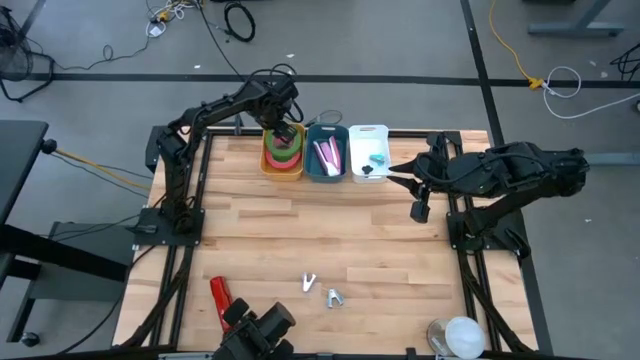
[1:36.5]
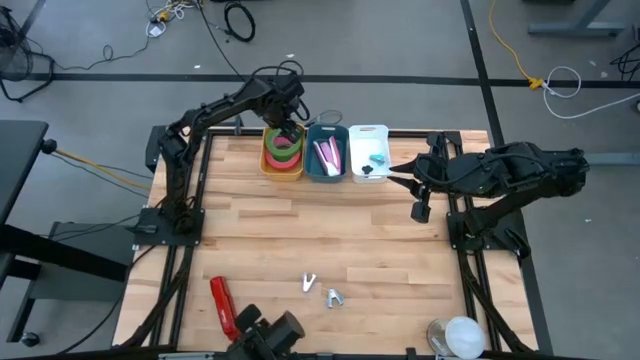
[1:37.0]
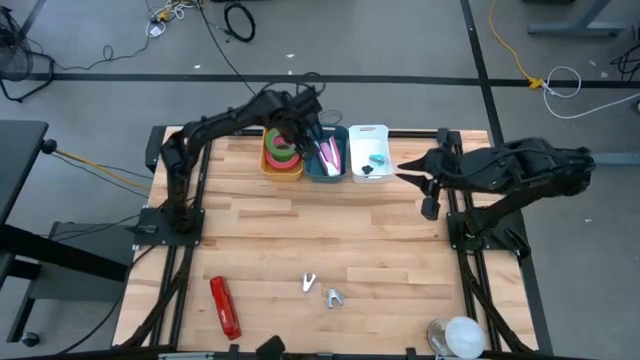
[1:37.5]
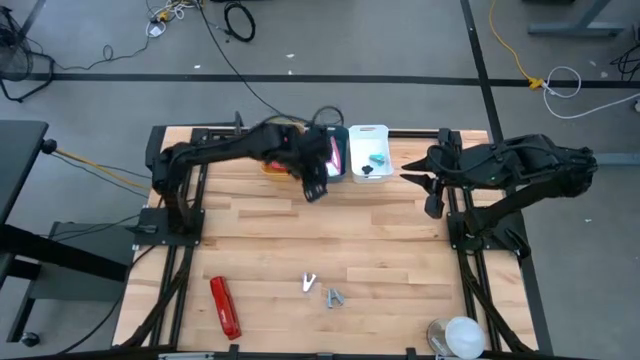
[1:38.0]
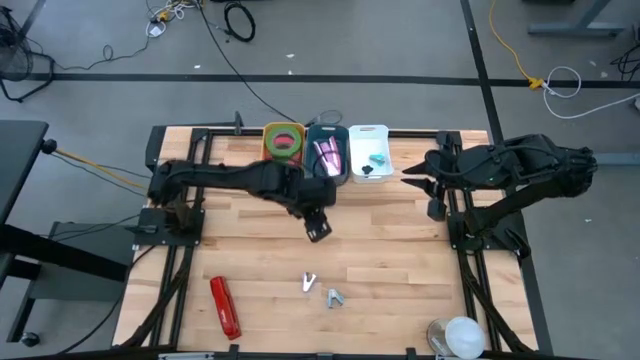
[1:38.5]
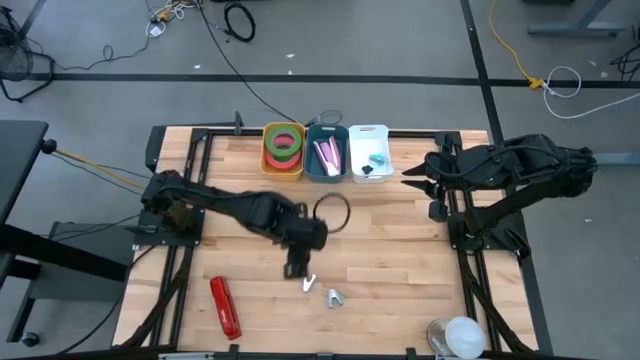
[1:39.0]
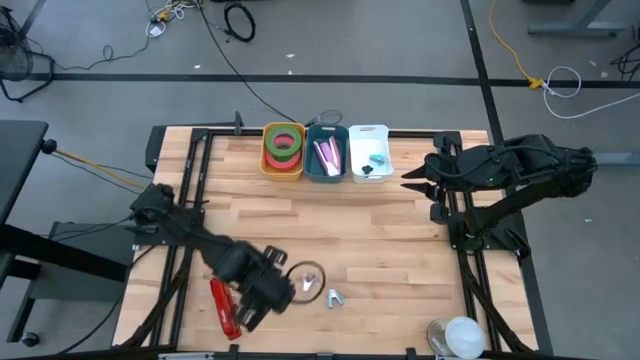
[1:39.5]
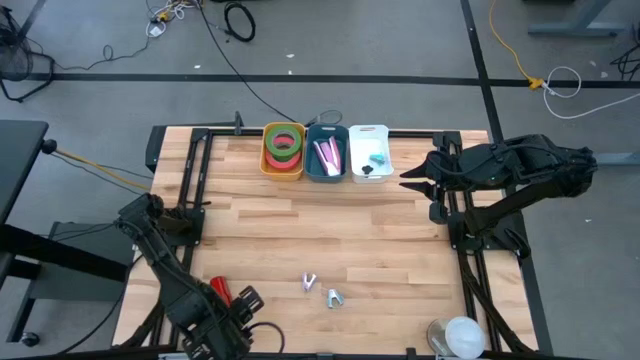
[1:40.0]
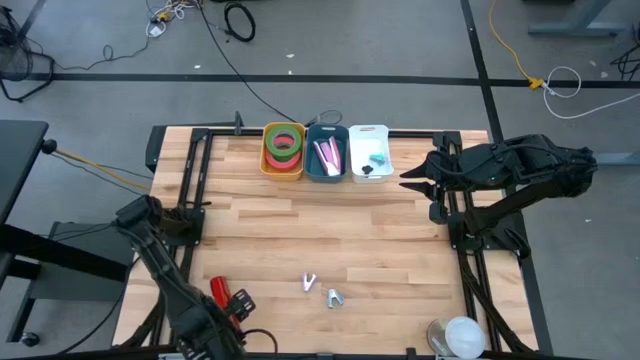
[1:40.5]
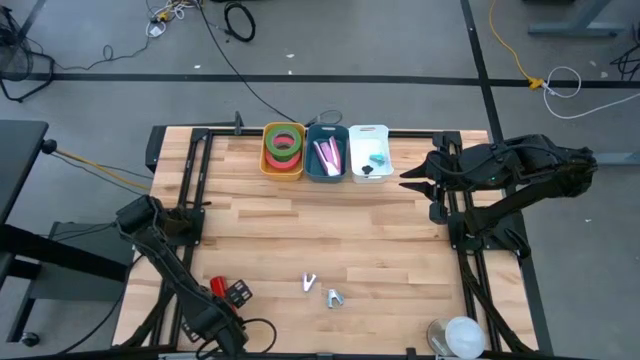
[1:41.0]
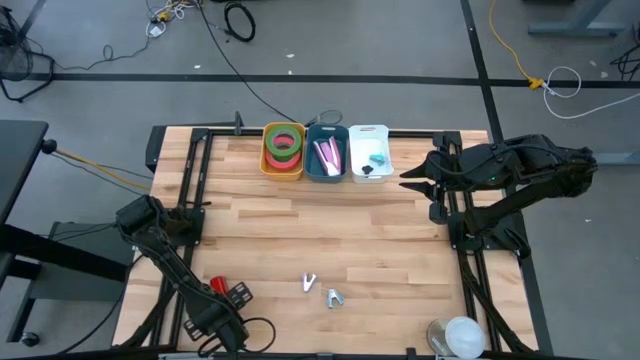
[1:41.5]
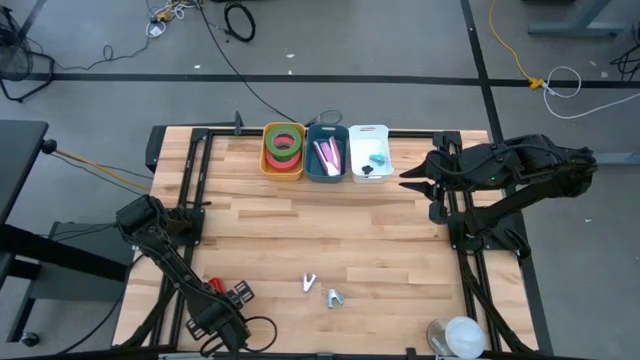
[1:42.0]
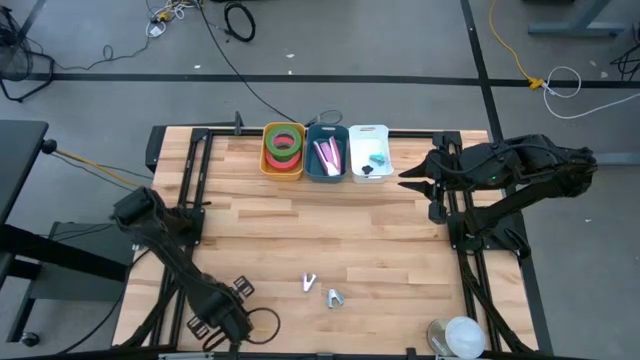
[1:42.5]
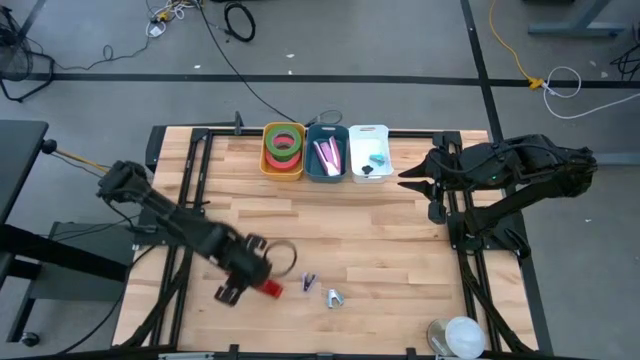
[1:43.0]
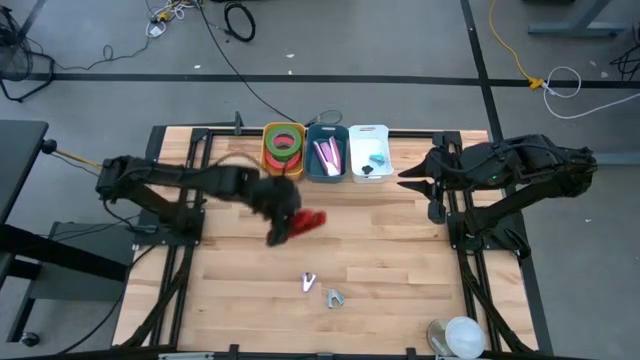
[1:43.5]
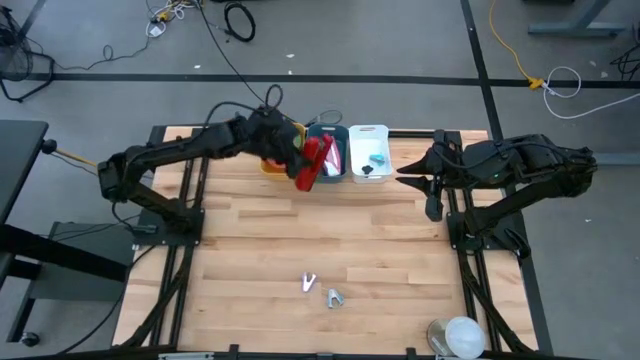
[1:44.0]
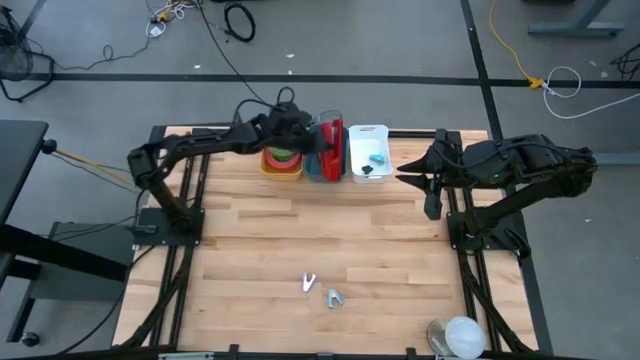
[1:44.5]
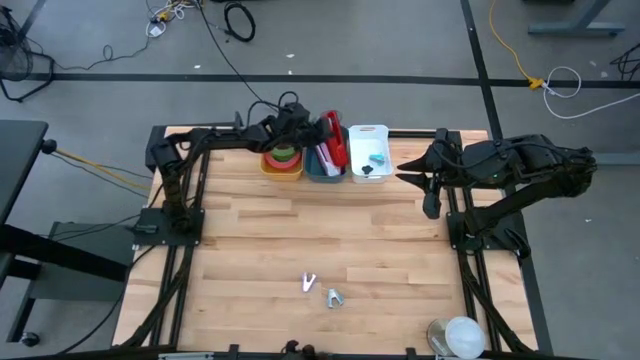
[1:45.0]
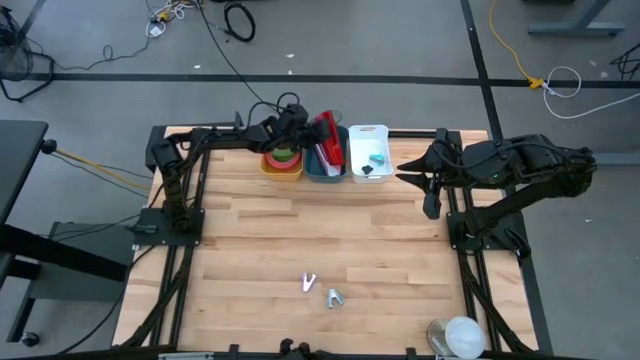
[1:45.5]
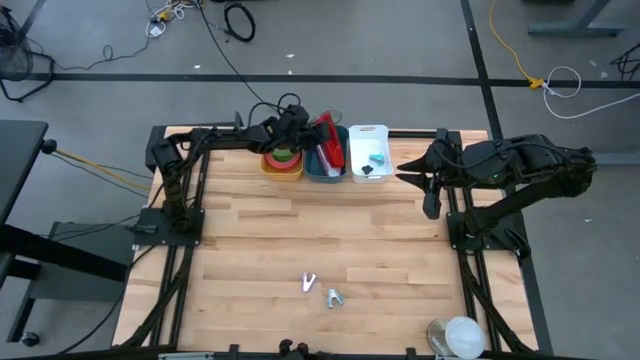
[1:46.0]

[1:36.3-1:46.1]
Task: Pick and place Stapler, Stapler remover, tape
Put the red stapler into the dark blue bin

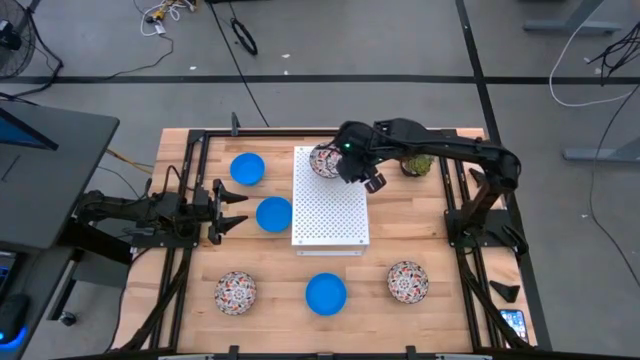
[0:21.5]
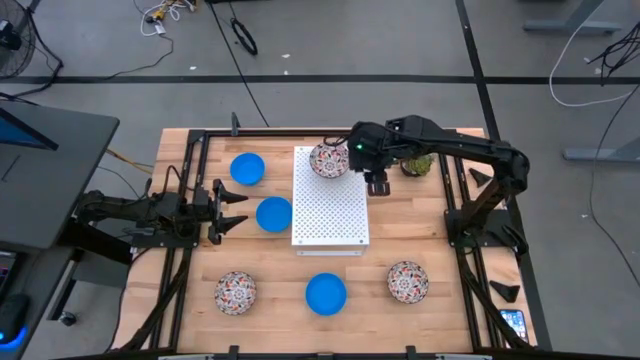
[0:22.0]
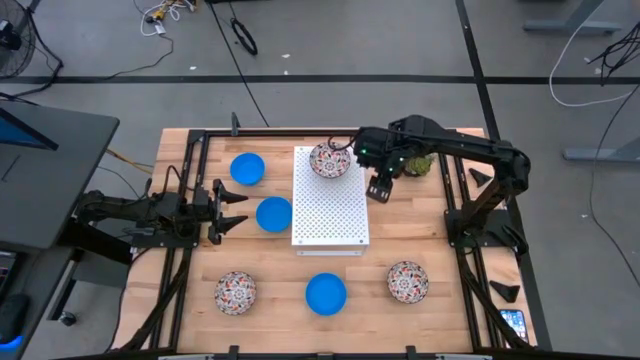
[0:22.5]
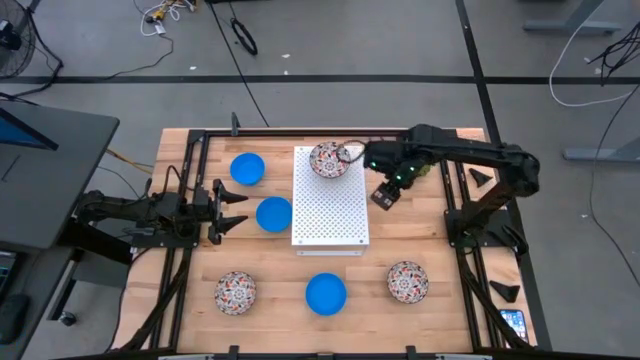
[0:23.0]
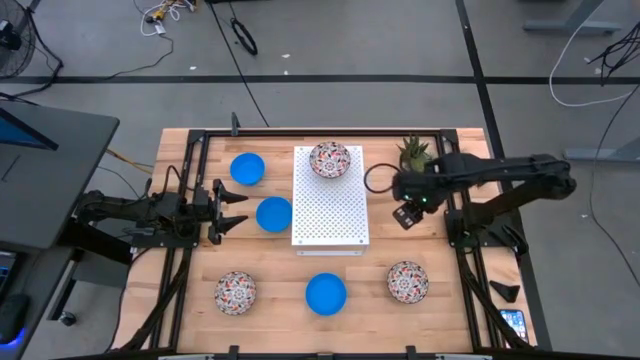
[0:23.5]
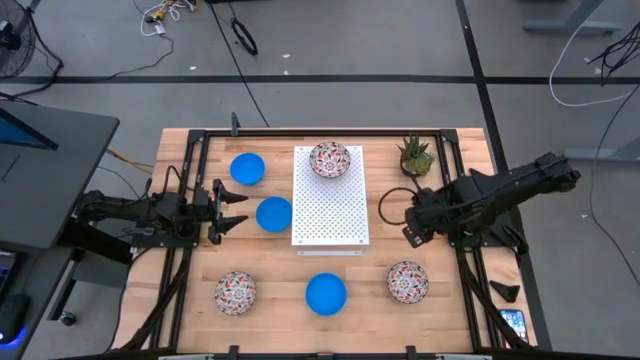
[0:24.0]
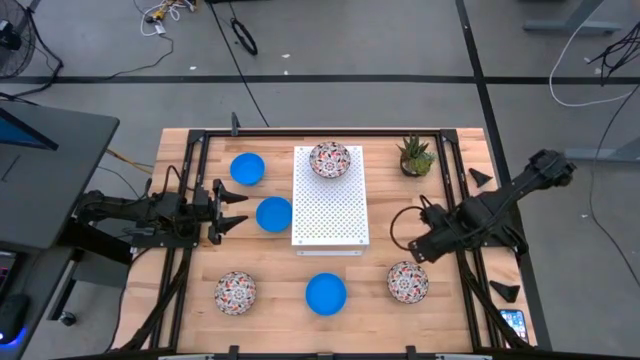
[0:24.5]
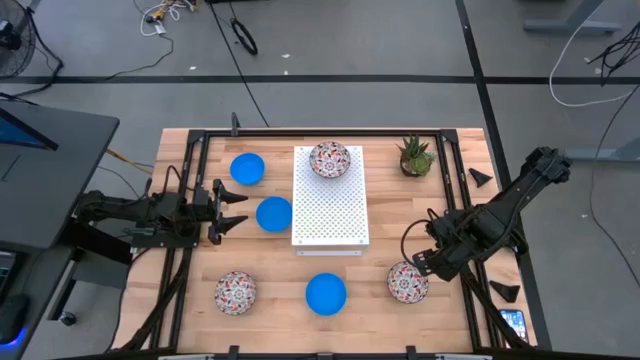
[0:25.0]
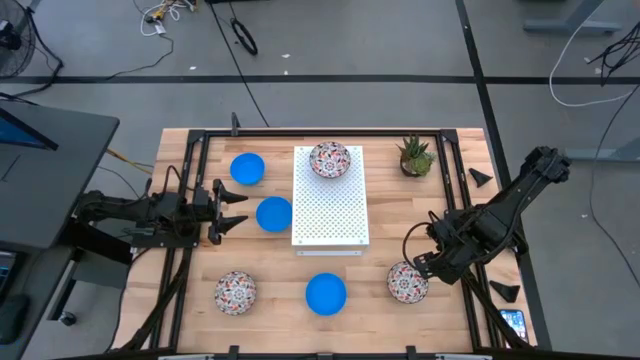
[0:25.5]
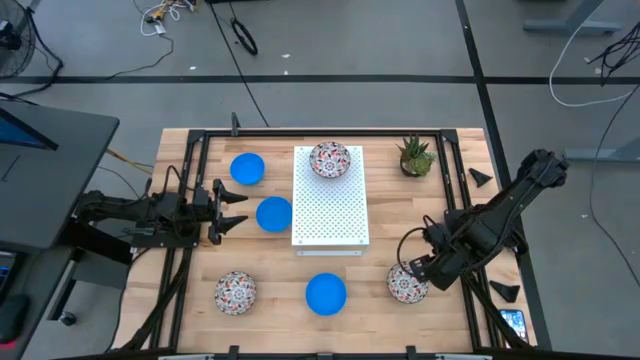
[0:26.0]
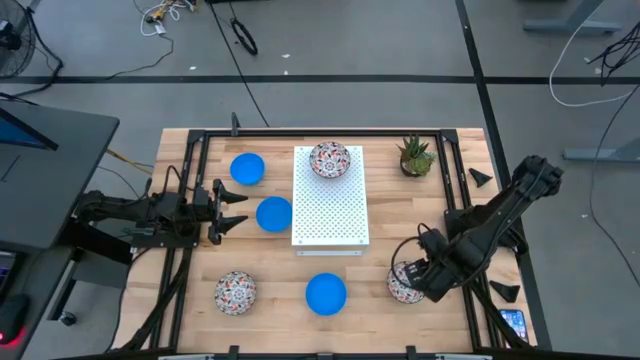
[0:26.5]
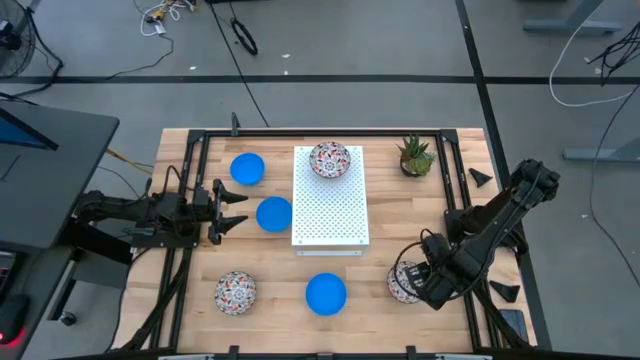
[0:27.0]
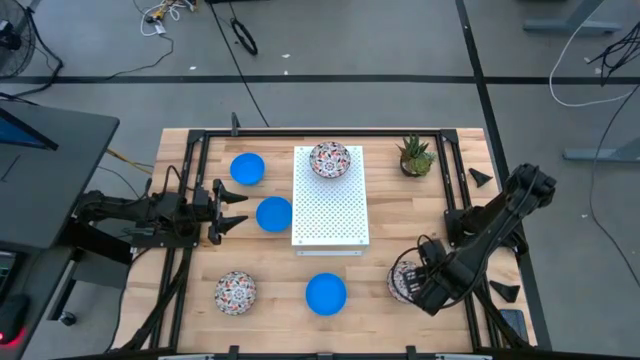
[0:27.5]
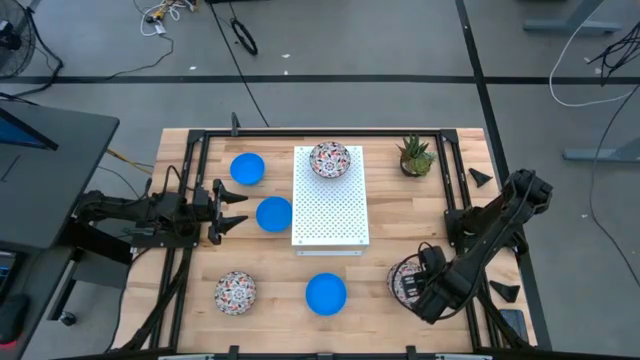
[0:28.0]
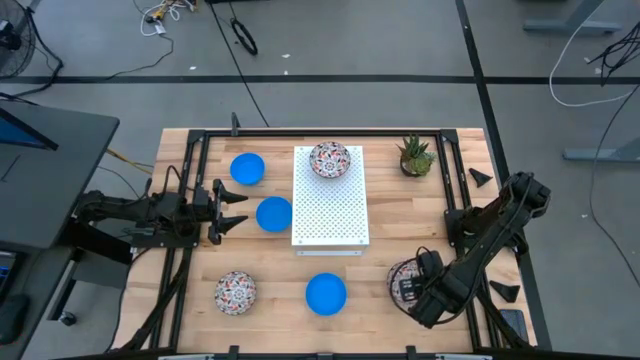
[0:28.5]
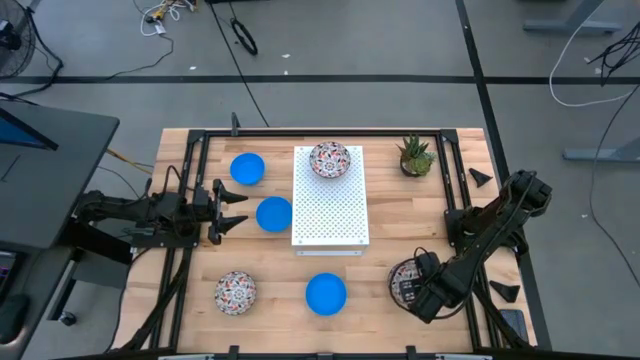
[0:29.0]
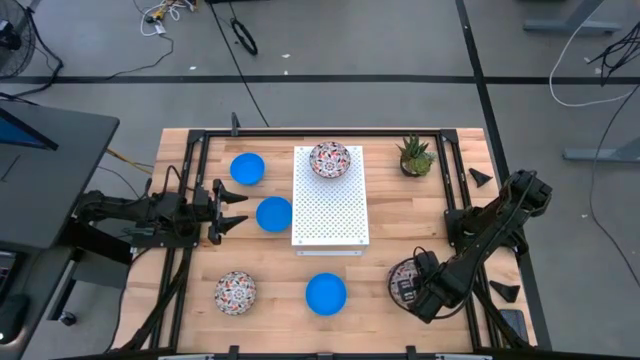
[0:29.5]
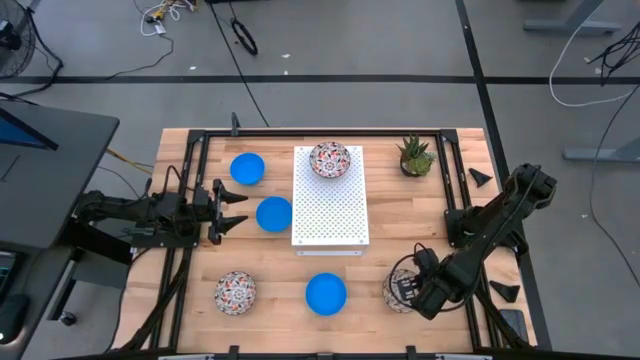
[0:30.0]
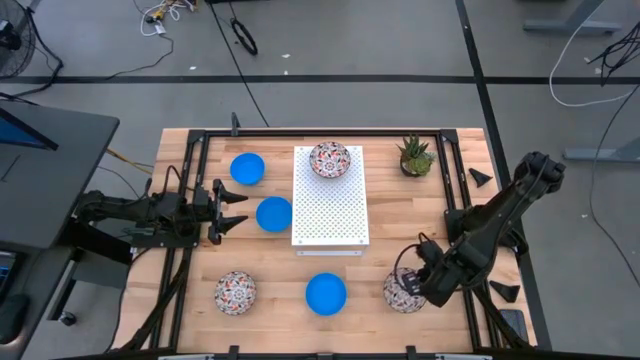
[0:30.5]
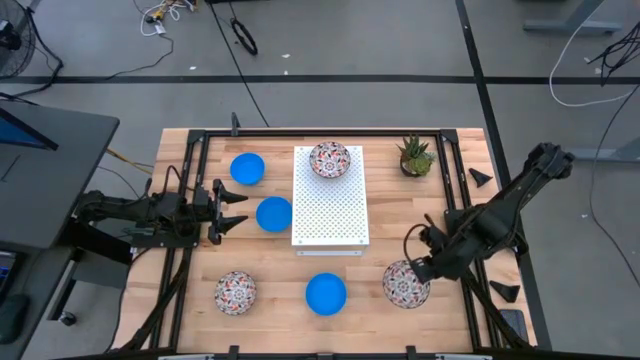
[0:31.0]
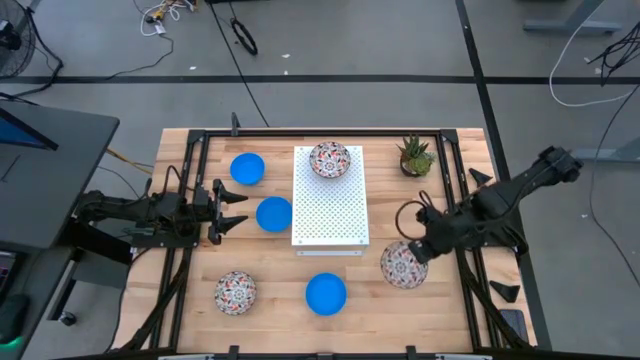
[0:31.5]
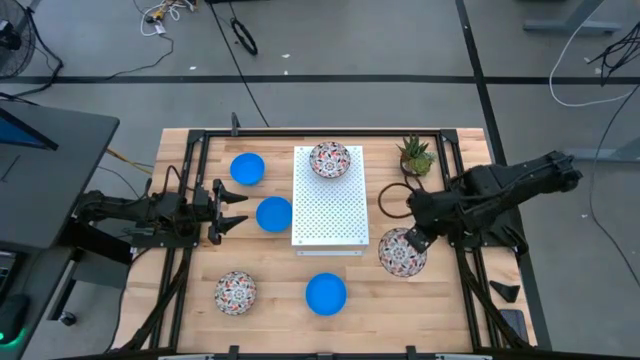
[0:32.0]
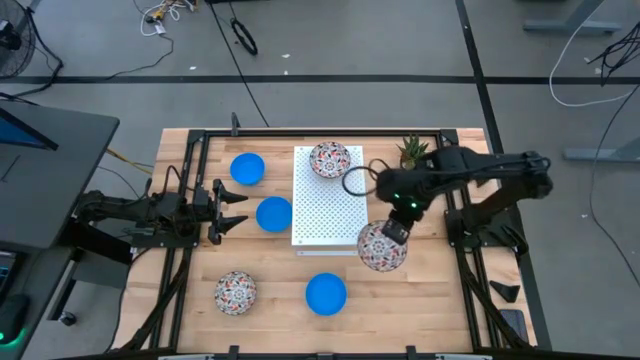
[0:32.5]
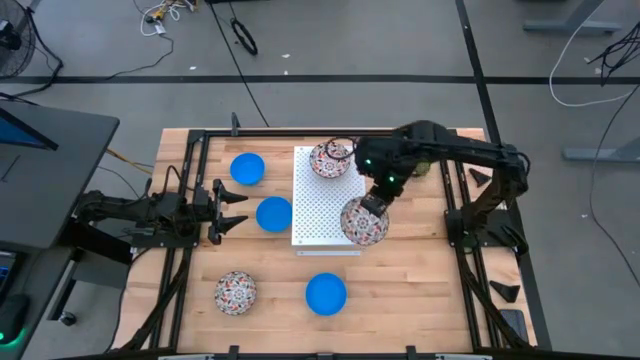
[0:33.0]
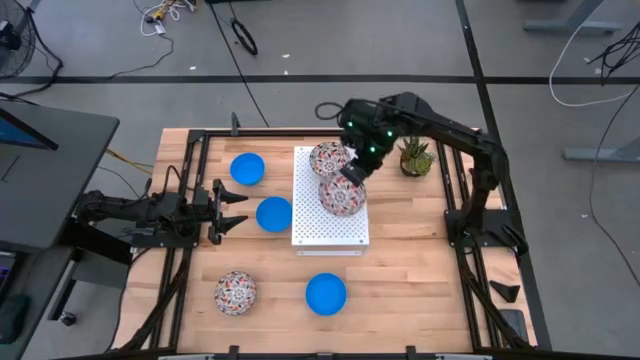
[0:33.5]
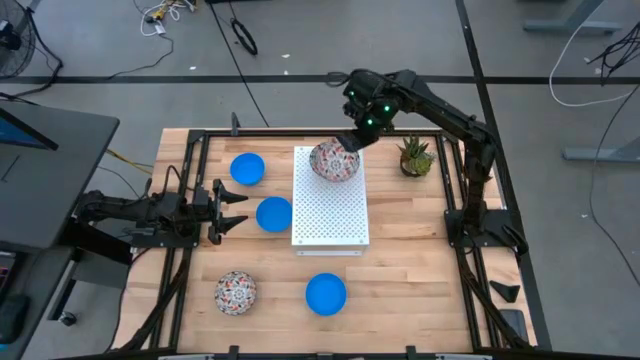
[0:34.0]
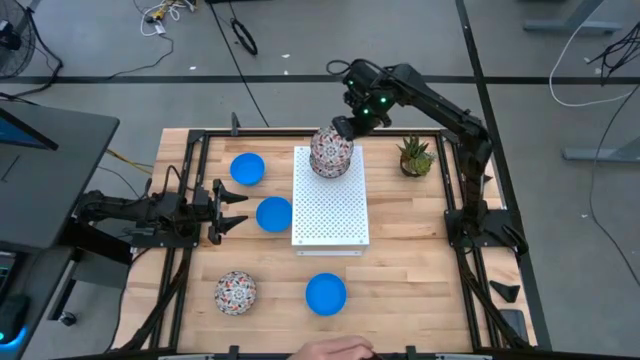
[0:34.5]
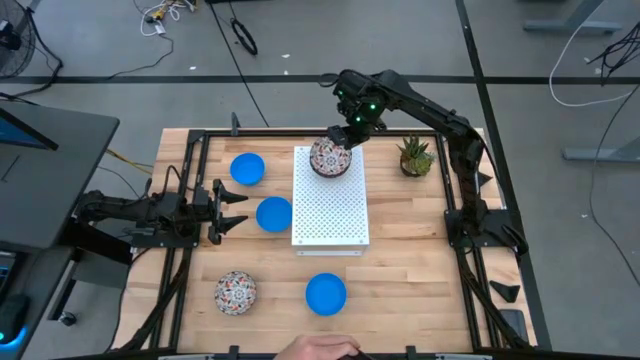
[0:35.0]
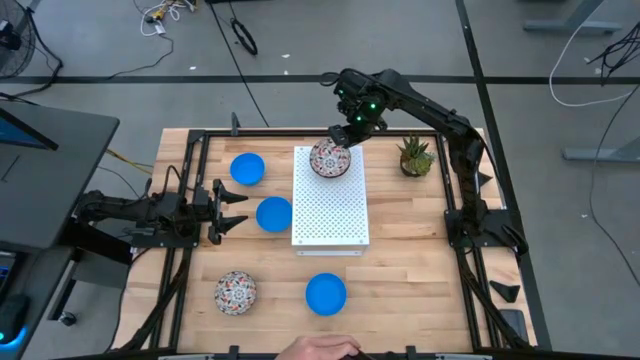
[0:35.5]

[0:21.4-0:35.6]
Task: Pick & Place Mini bowls
Stack the right white bowl on top of the other white bowl on the shelf
